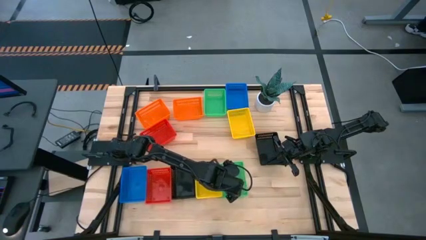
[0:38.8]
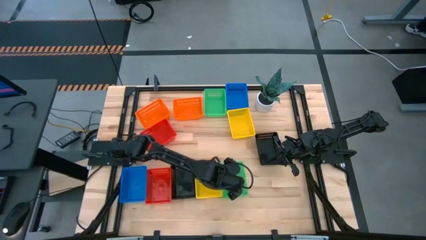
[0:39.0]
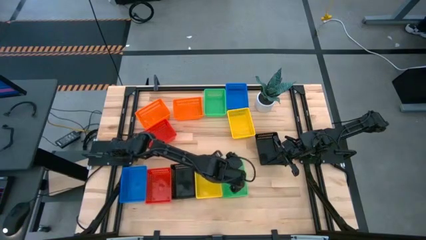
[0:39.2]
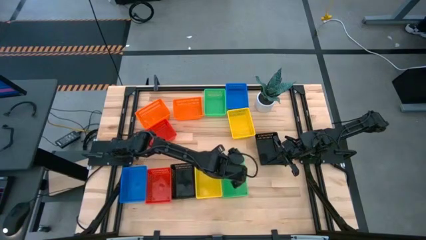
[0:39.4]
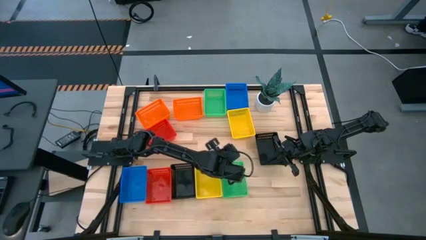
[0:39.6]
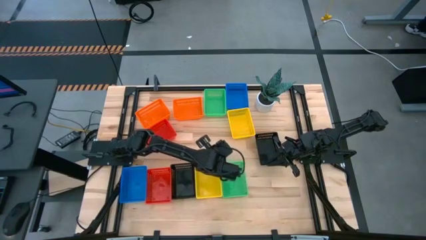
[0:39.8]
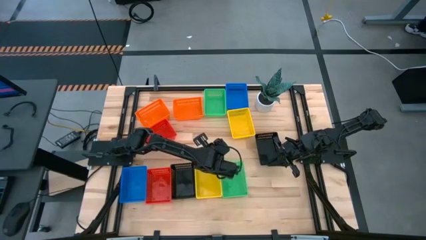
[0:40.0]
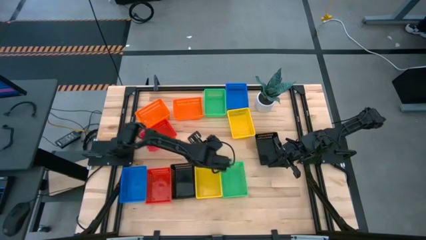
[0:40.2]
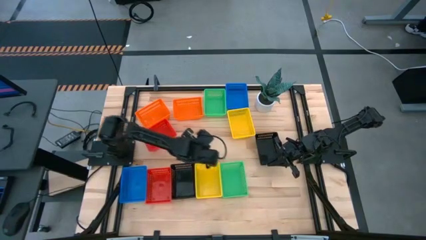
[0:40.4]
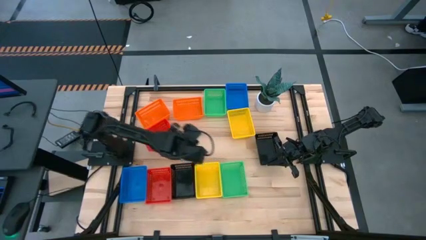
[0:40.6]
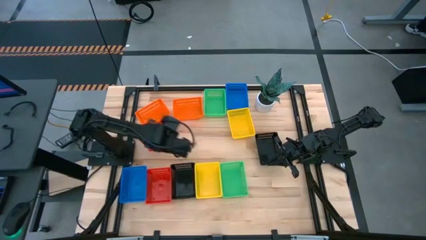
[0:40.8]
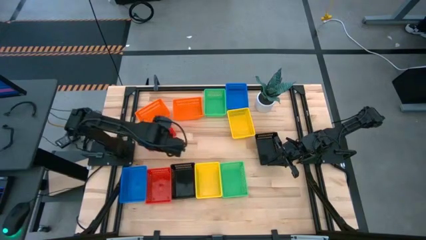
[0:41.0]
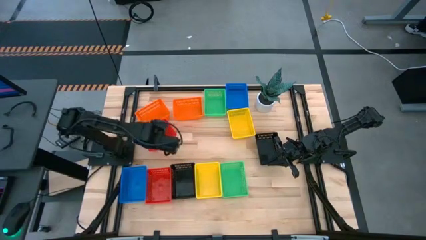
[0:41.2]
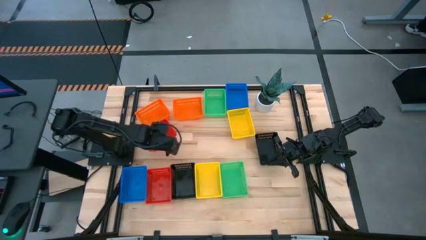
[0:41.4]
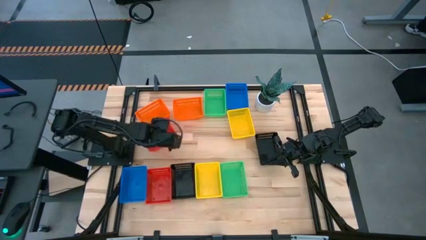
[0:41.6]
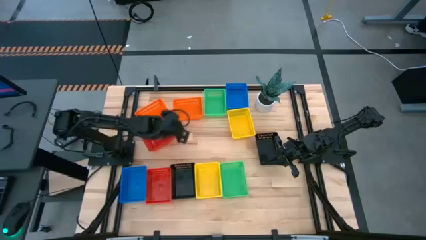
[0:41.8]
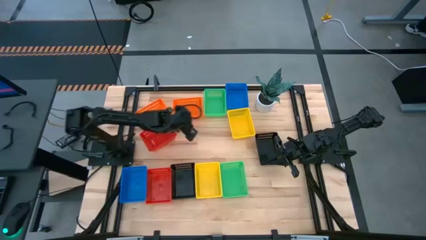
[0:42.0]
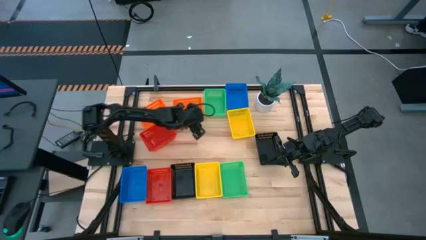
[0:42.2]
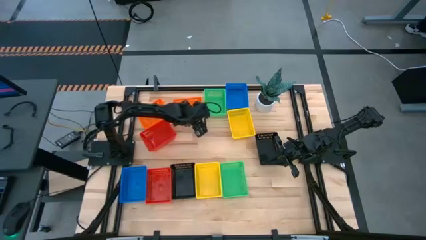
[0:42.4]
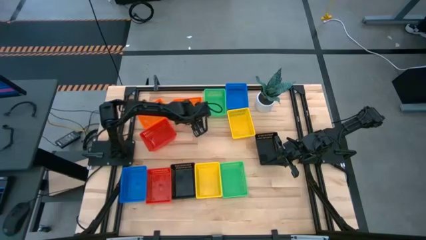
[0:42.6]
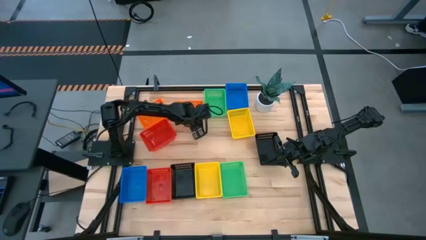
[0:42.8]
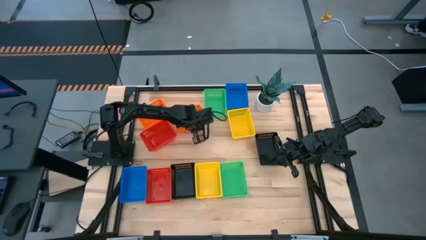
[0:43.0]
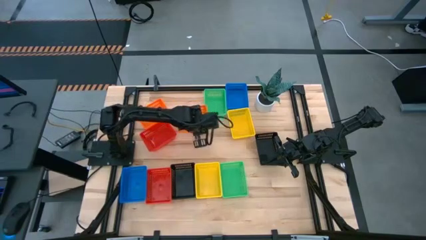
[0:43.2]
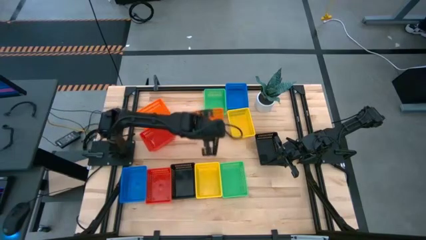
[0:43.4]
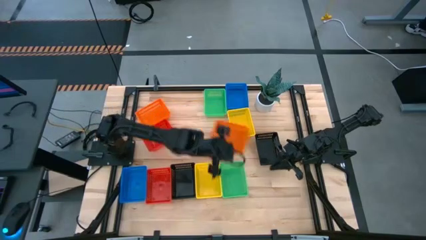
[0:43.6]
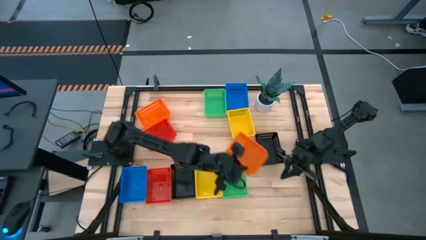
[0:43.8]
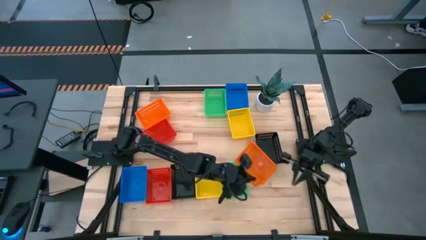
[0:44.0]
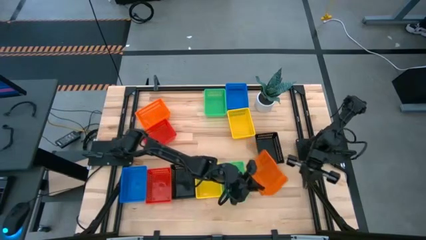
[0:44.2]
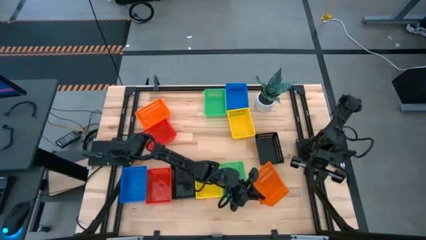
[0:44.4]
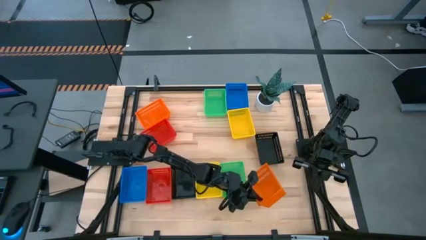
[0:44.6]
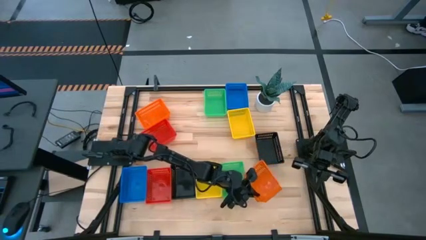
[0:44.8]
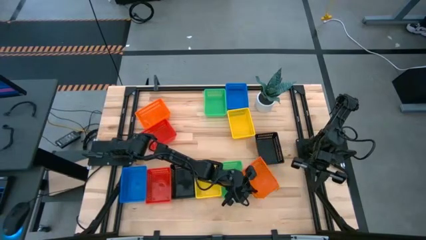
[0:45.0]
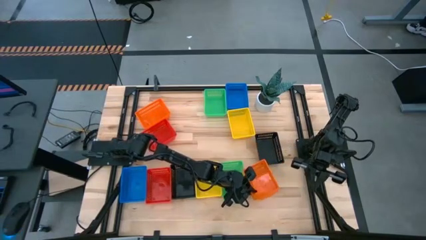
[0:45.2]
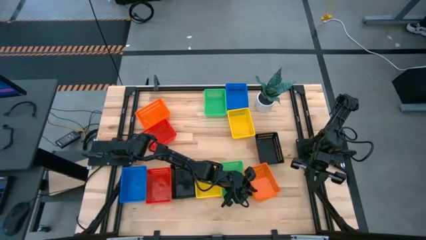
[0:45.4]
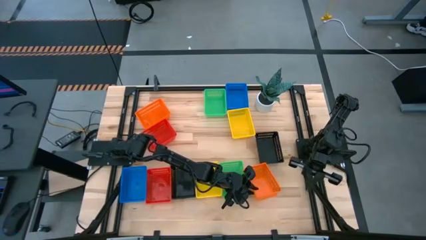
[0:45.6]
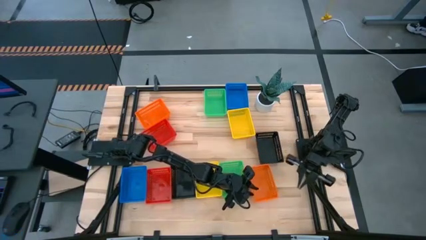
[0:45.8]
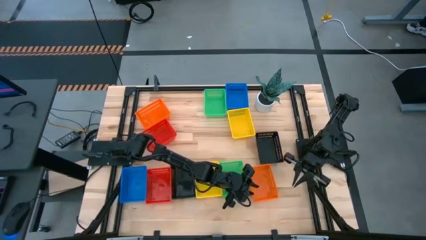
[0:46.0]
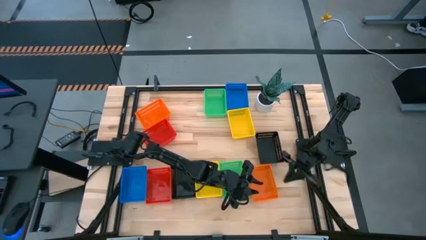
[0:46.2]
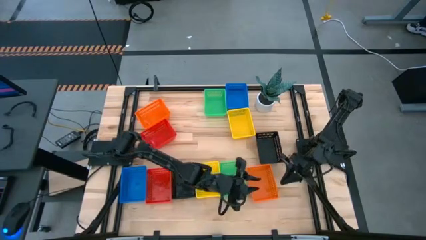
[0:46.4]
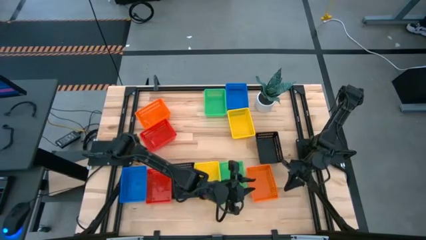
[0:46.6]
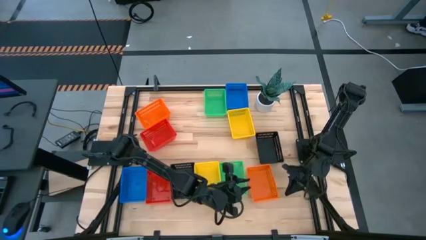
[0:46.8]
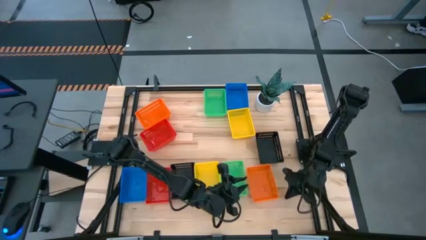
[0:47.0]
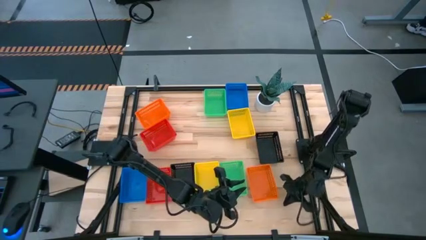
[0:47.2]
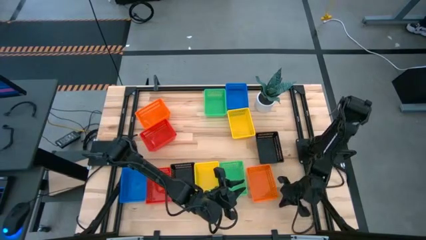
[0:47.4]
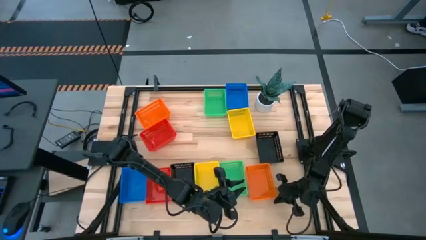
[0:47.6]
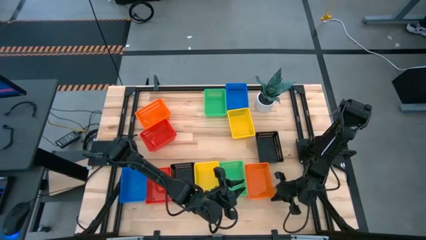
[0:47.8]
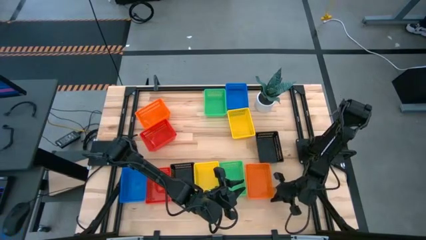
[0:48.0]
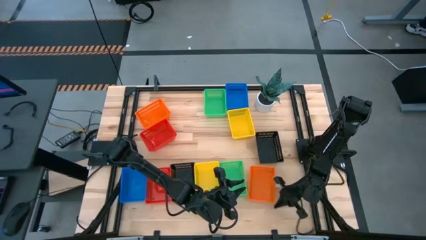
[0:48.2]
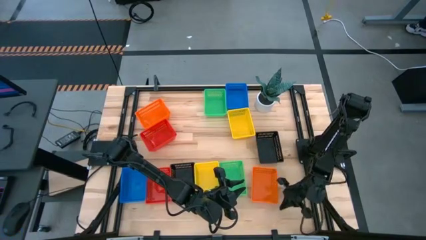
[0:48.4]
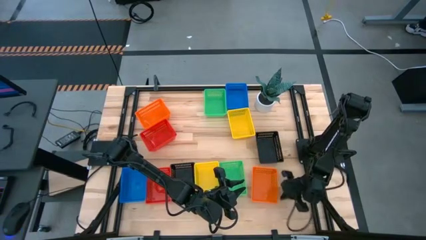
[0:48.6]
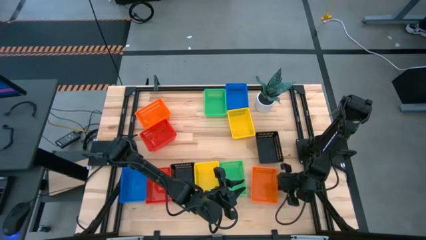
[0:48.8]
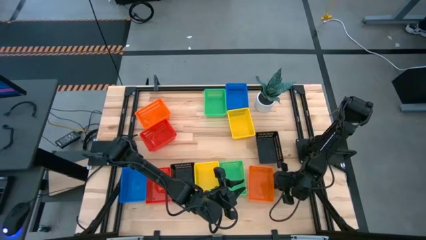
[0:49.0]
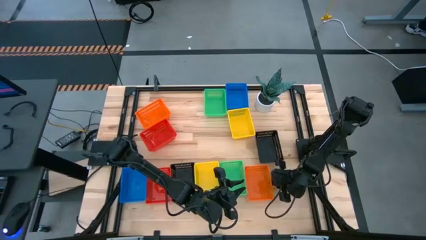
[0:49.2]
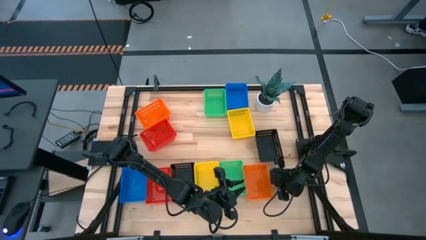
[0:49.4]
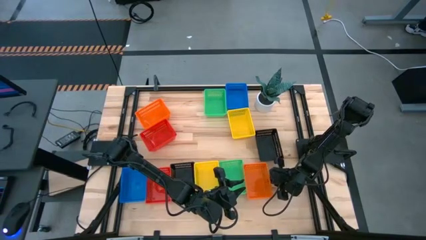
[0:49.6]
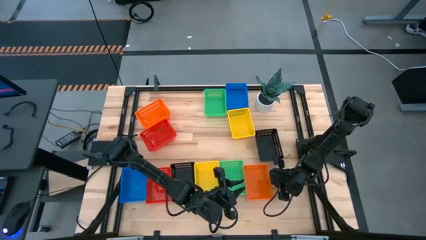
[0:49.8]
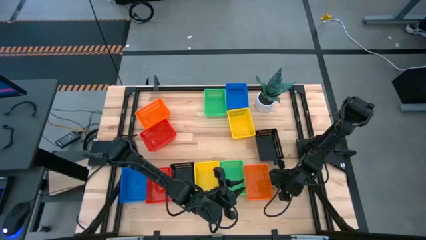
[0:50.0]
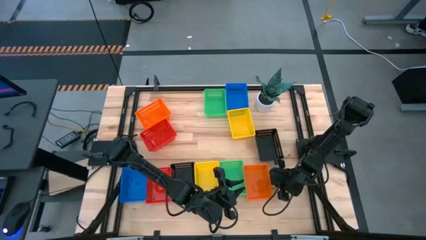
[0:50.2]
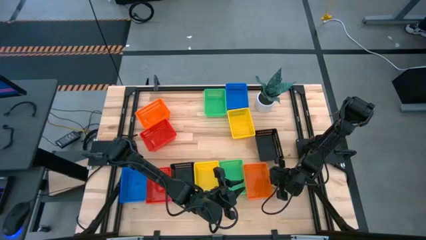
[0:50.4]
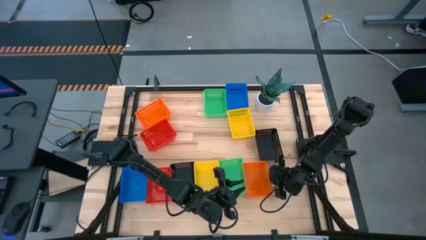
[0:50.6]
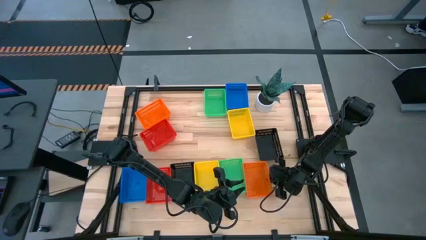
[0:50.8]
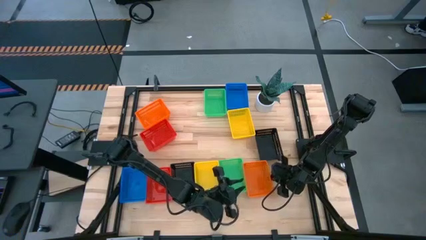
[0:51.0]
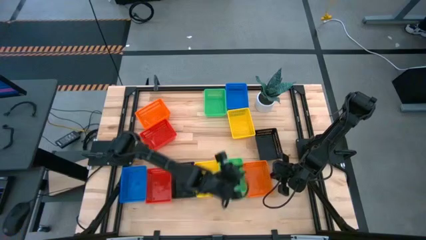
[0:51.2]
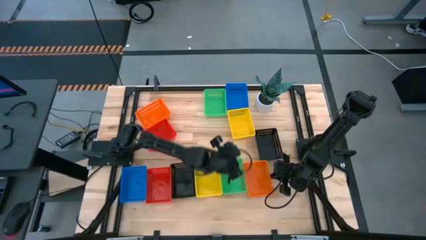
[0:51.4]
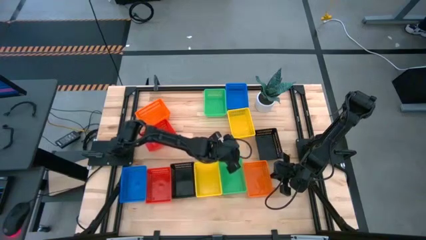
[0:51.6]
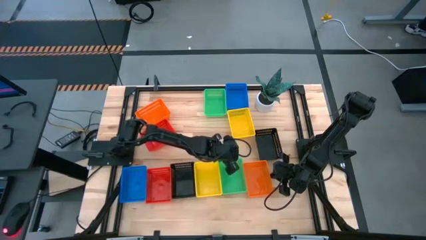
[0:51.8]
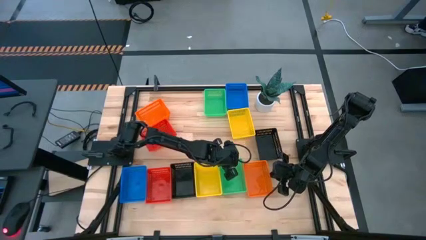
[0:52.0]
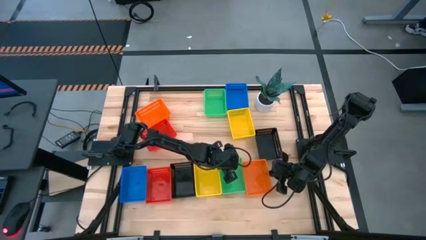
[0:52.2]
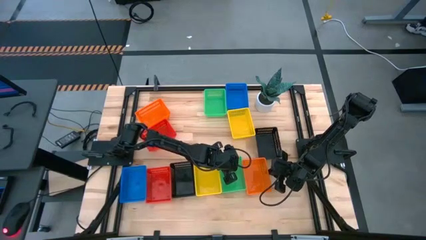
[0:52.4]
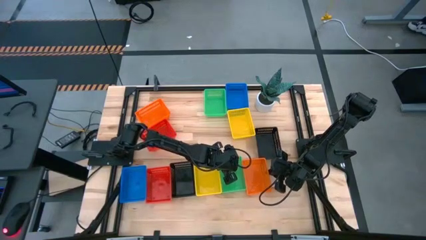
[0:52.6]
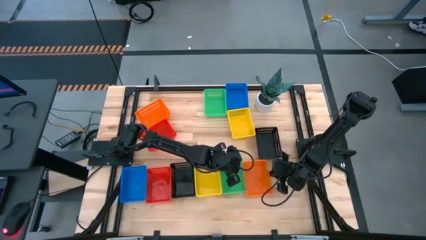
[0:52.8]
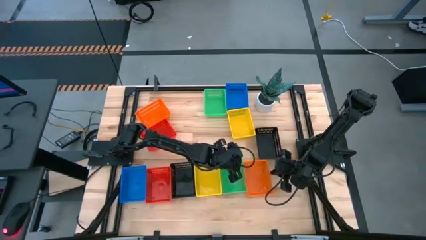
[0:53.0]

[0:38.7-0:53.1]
Move the right orange bin to the bottom right of the table
